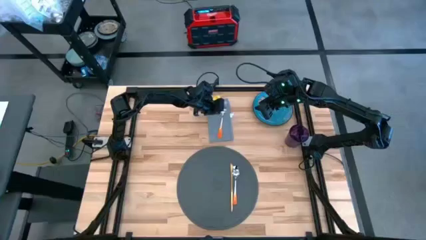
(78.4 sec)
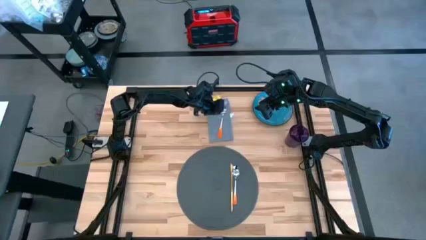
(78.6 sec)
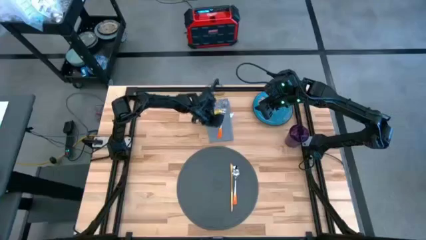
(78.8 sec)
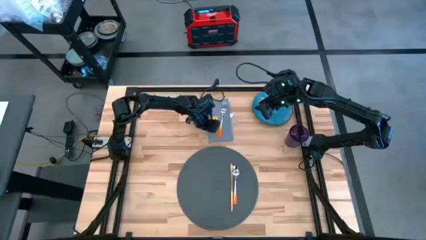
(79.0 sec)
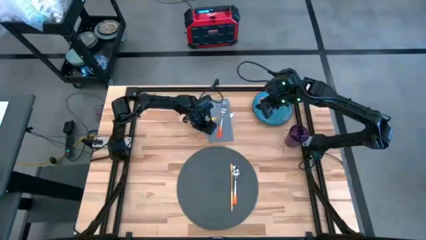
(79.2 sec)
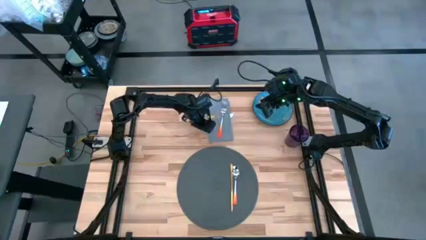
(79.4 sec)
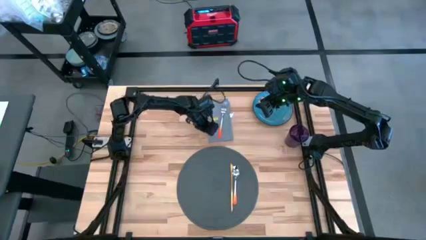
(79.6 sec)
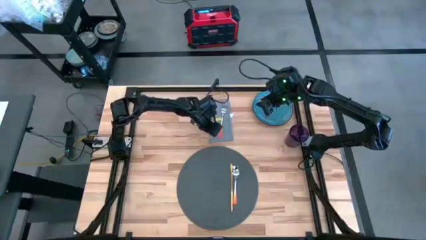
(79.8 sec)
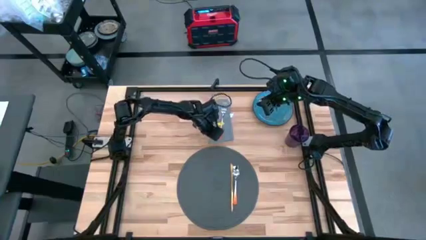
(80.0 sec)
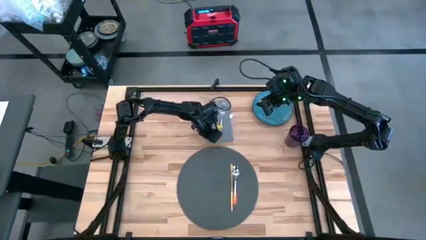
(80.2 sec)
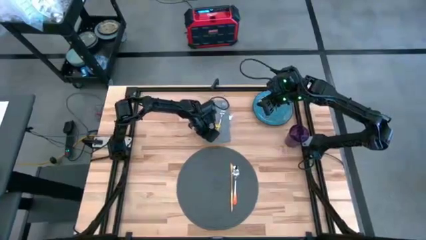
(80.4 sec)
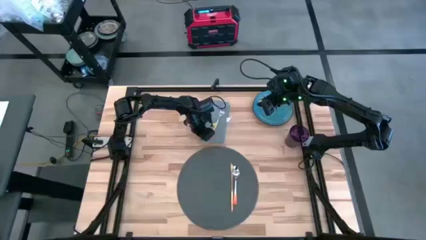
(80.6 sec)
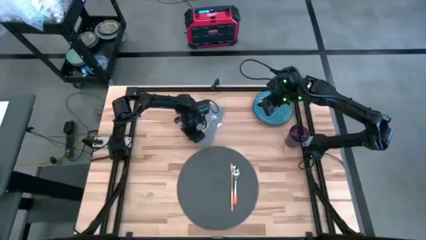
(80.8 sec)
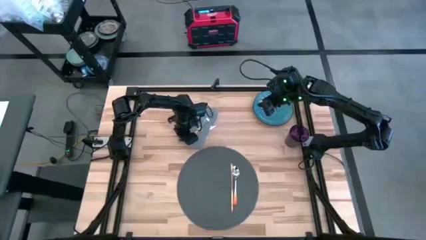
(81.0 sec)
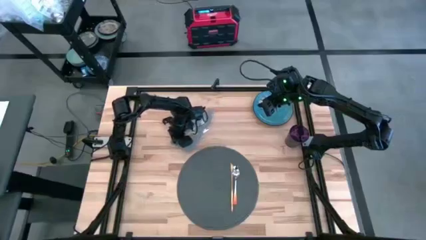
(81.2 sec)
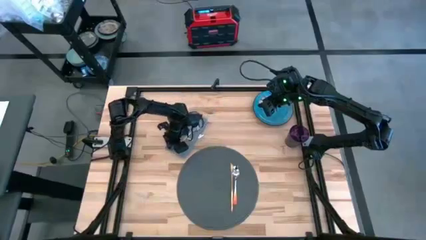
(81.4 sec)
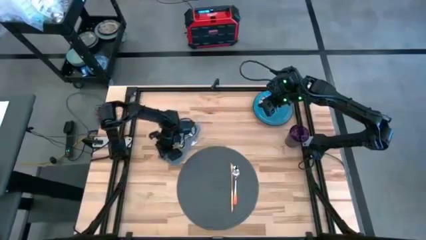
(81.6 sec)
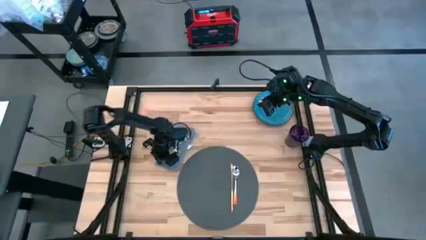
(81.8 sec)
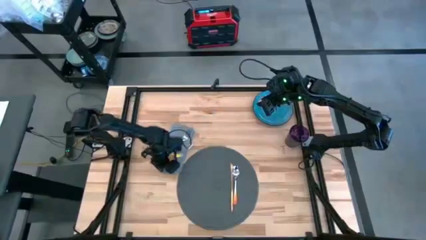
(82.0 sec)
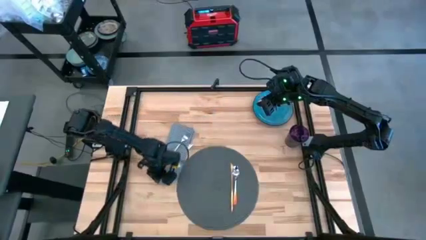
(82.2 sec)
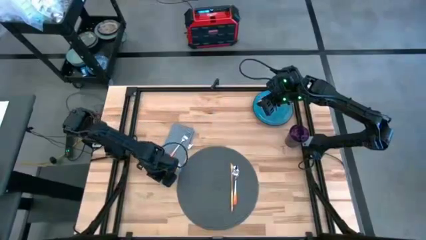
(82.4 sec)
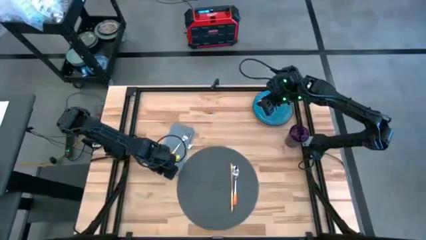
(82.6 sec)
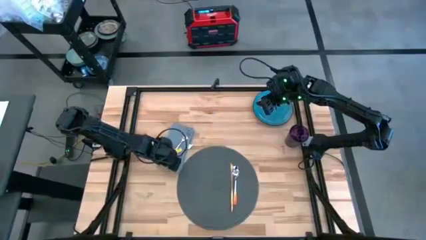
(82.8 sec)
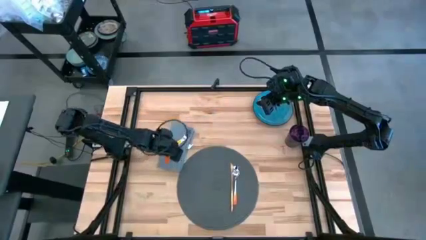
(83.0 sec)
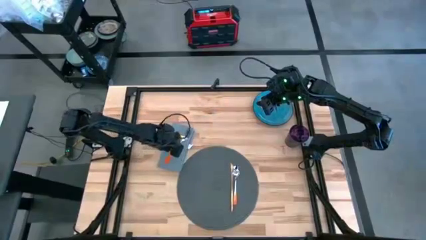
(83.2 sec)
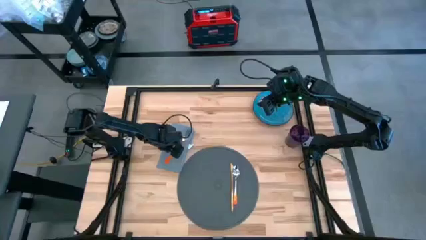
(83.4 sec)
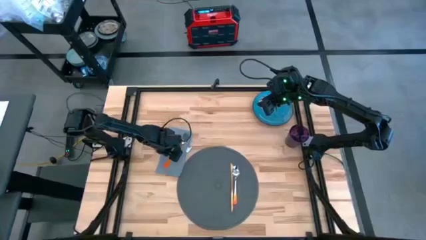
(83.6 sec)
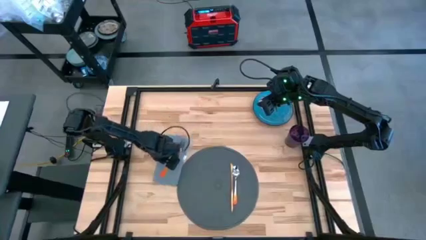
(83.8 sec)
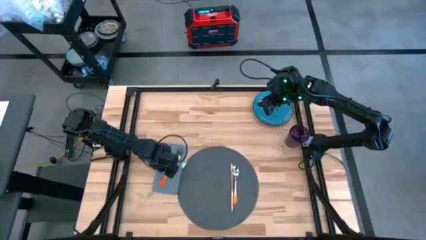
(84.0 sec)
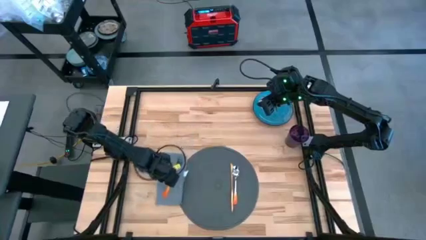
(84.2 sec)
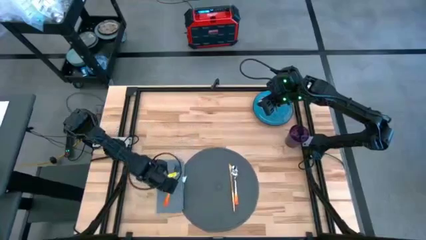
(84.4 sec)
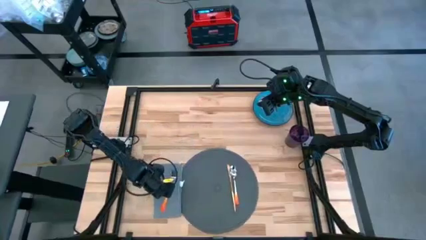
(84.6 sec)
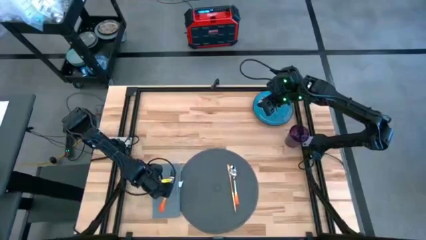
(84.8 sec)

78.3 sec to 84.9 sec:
Task: Set table place
Move the gray table napkin to the left side of the gray table mat

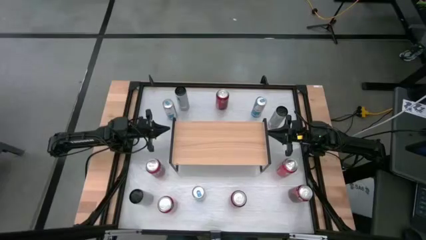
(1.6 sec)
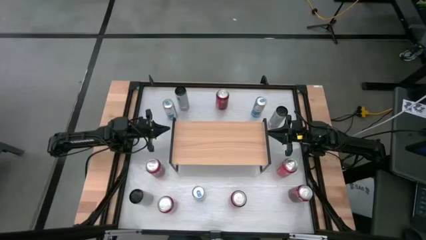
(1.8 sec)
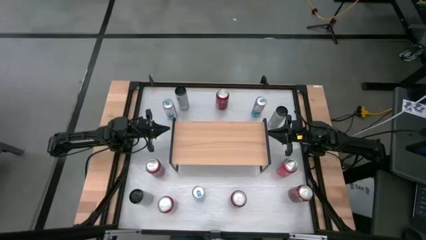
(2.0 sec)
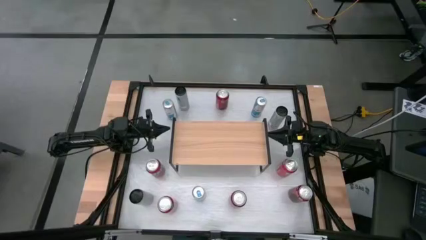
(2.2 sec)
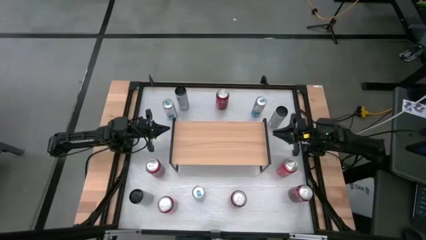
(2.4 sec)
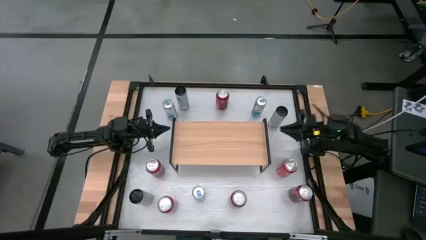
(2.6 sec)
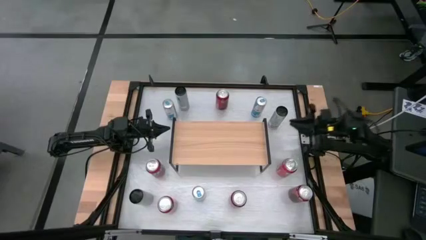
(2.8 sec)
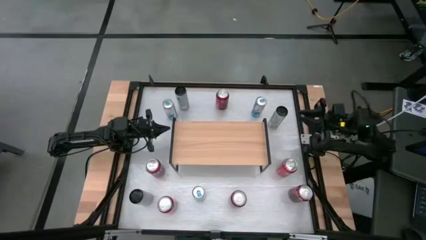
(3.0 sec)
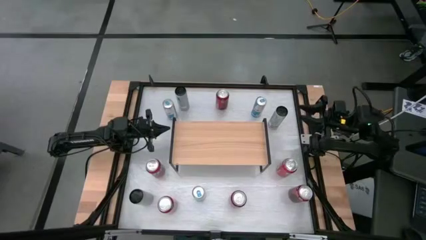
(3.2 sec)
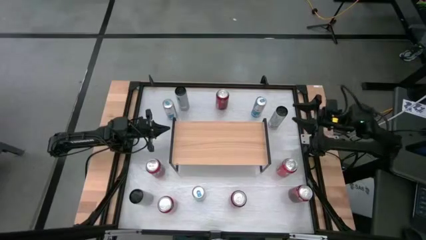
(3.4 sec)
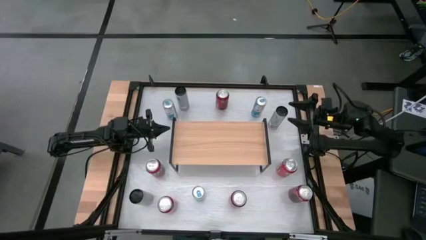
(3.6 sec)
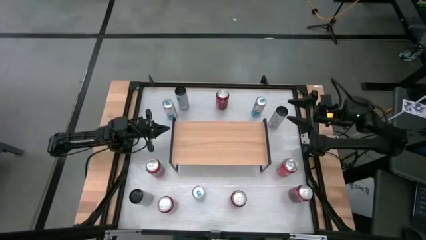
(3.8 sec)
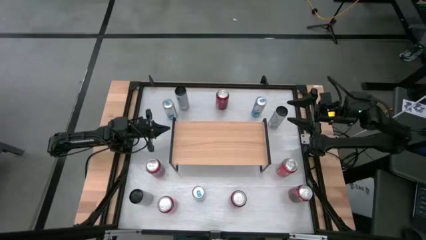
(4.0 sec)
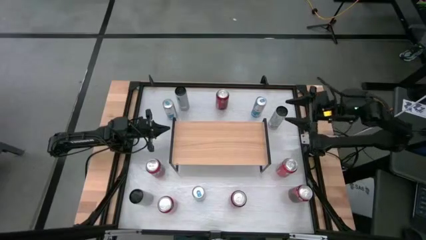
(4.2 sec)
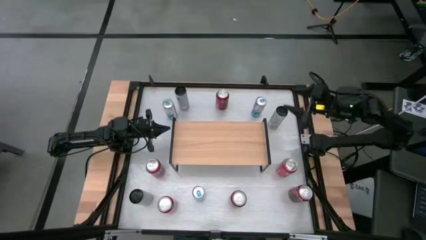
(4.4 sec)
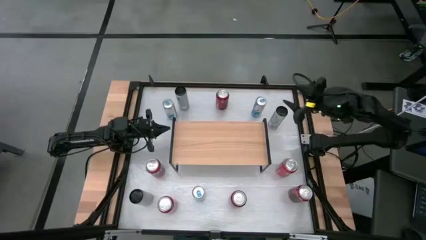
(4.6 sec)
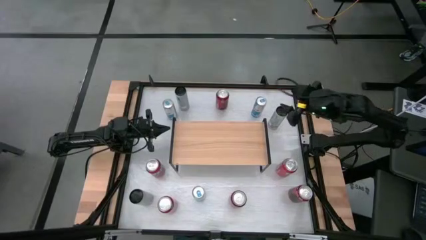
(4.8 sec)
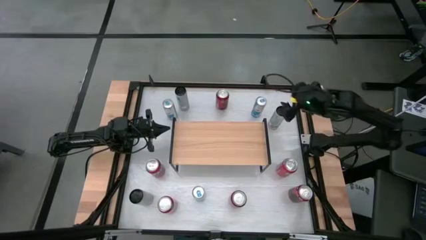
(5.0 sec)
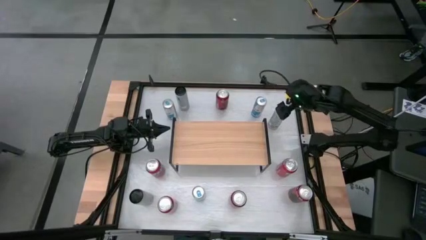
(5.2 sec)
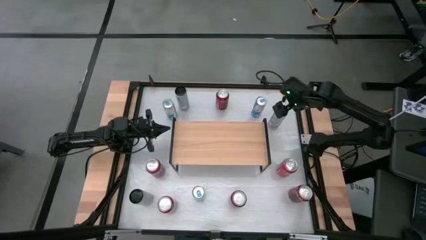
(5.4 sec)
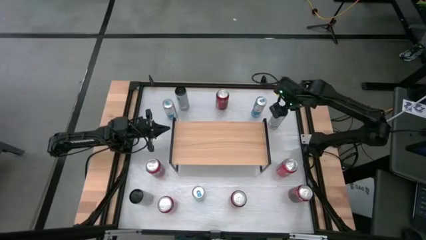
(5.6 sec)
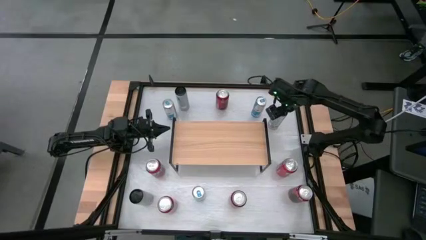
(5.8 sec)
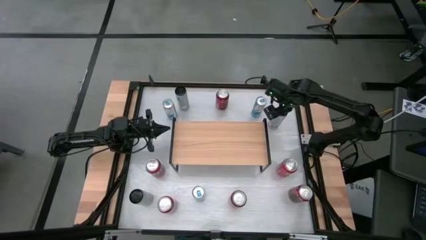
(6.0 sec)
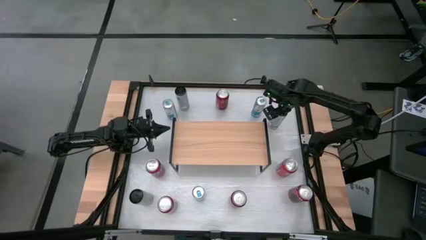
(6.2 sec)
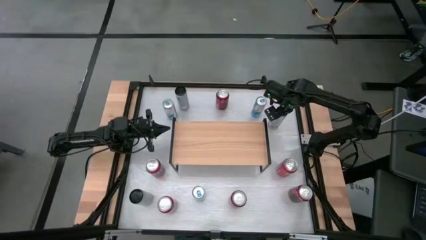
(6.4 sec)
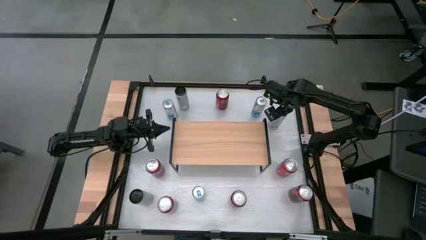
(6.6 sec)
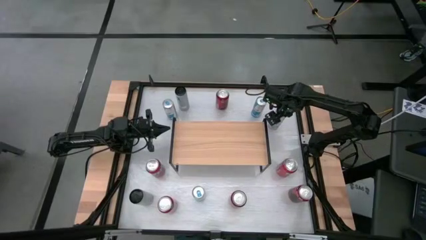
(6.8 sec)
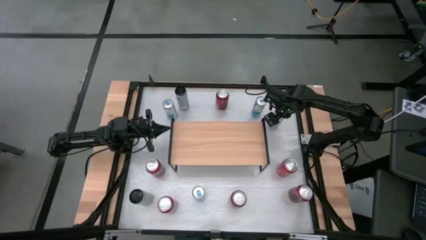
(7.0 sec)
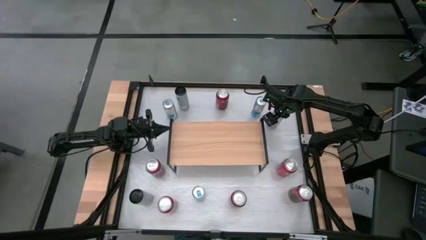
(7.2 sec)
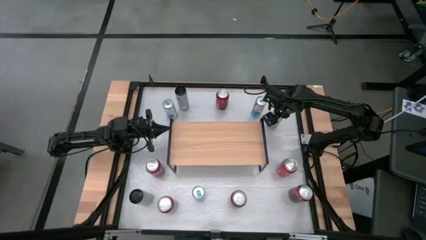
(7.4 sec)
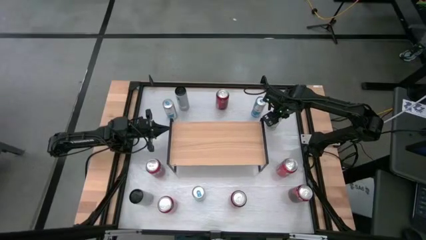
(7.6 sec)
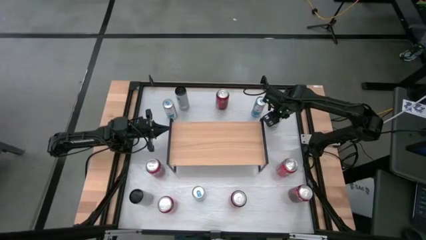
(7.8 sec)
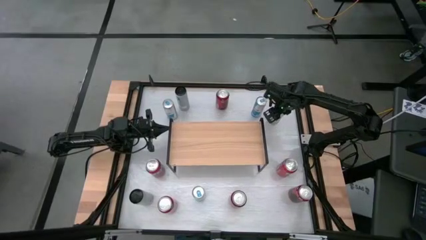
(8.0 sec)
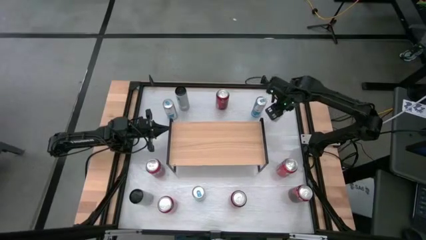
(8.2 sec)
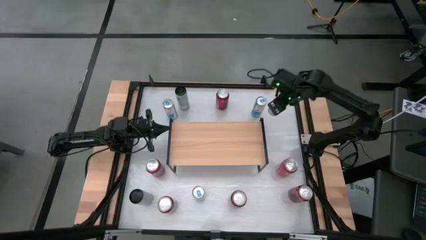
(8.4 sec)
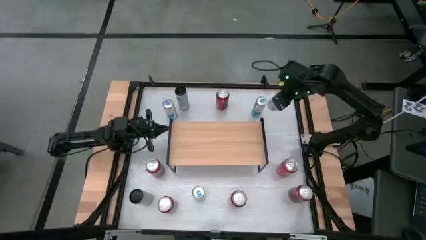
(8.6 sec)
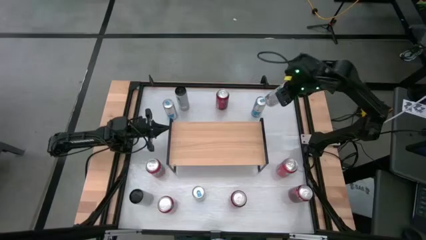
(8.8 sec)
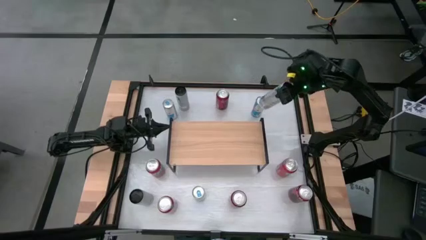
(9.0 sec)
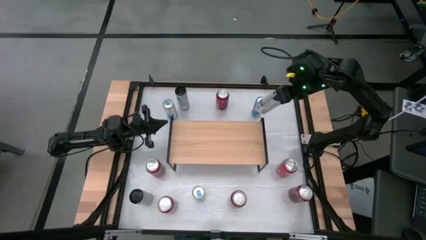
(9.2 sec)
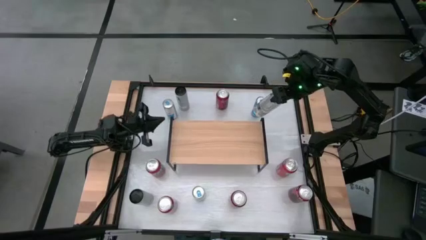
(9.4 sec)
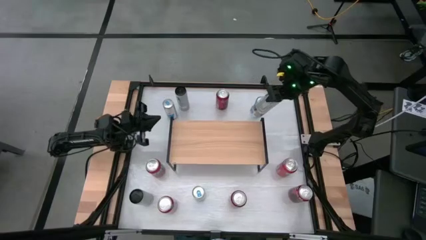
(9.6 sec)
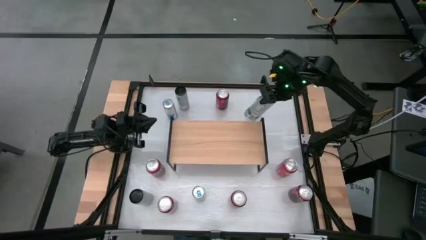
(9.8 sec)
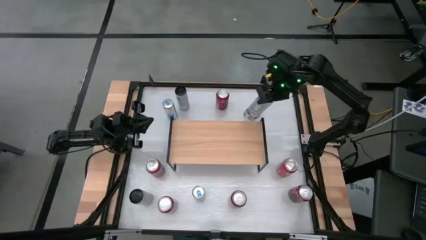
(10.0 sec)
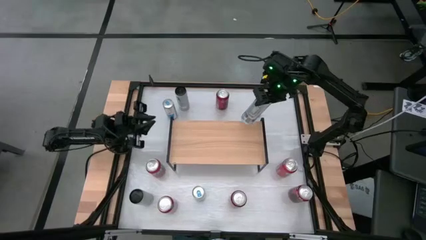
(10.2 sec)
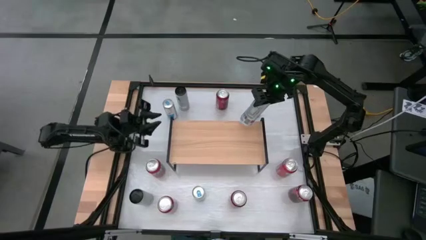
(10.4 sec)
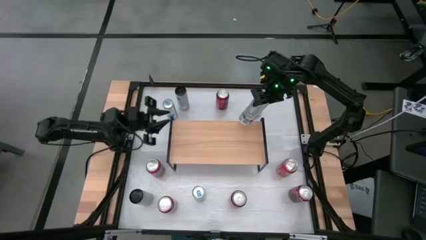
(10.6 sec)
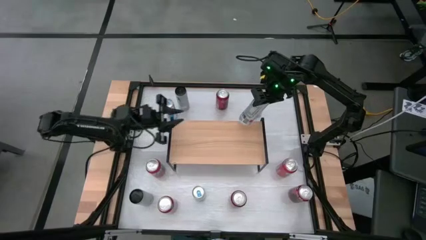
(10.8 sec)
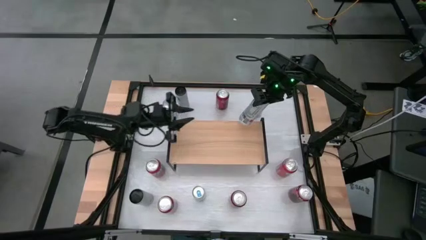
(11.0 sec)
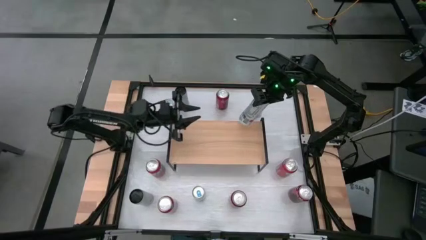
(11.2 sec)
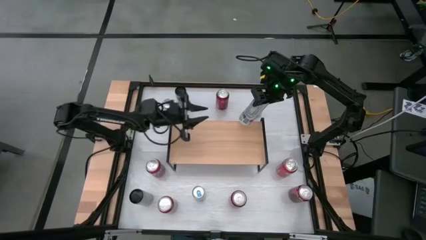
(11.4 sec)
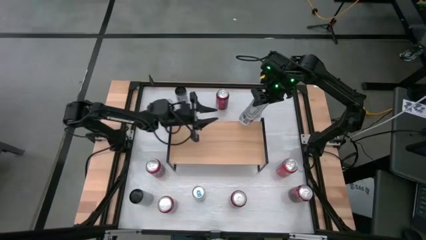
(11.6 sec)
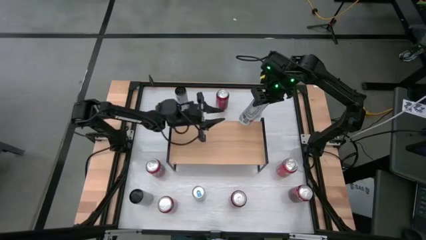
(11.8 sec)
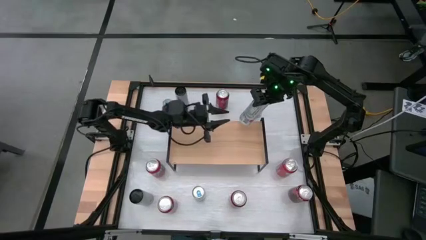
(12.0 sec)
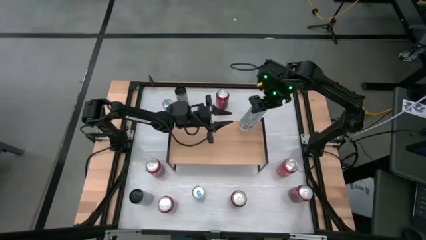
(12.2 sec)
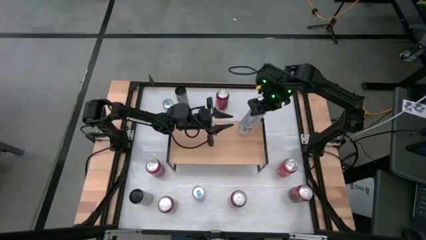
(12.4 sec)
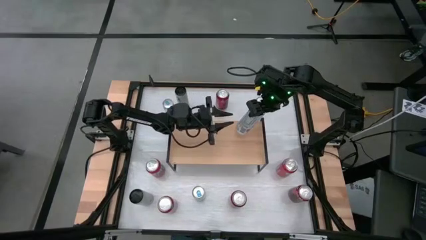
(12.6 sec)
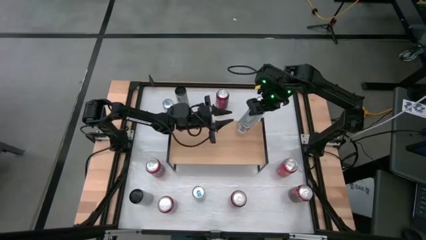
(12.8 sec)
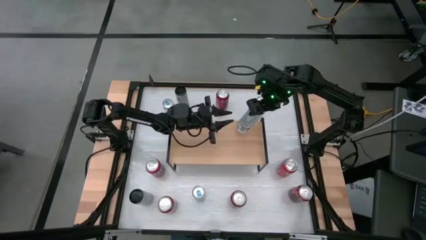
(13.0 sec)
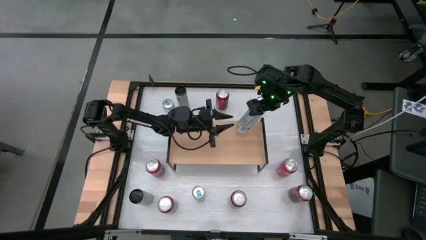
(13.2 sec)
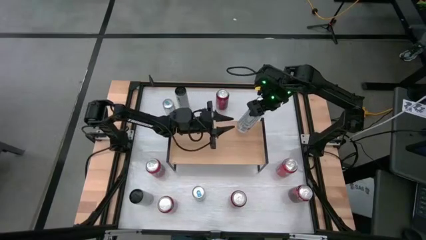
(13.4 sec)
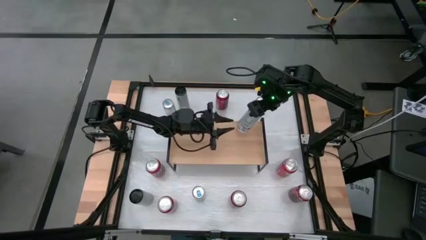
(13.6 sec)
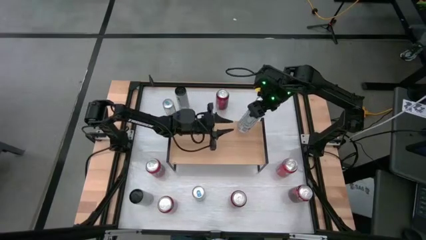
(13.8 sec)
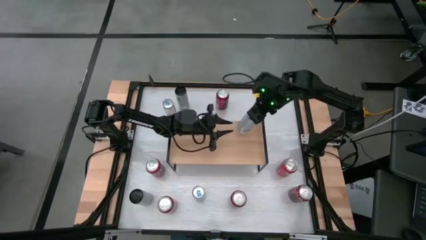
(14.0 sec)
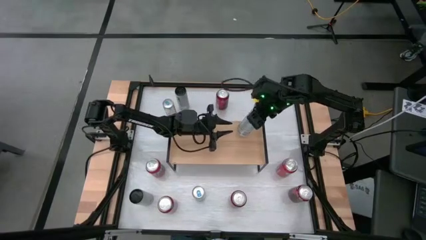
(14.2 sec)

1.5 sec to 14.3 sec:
Task: Place canned beverage on shelf
Put the top right white-pink soda can on the shelf
